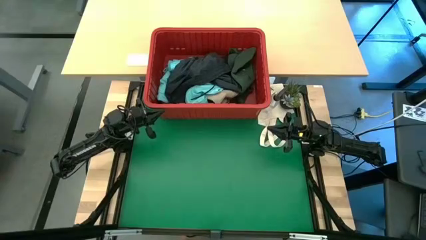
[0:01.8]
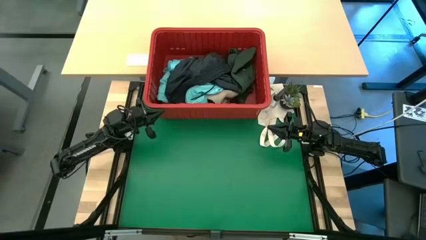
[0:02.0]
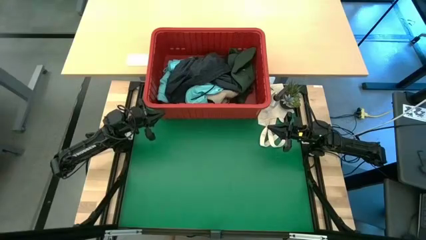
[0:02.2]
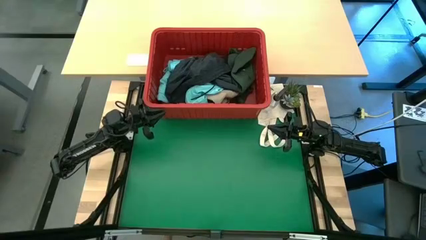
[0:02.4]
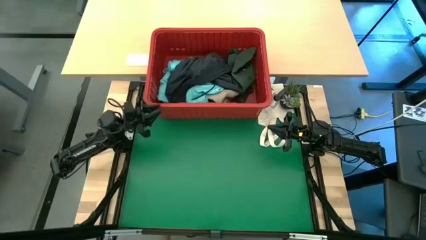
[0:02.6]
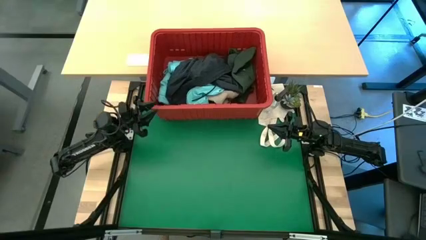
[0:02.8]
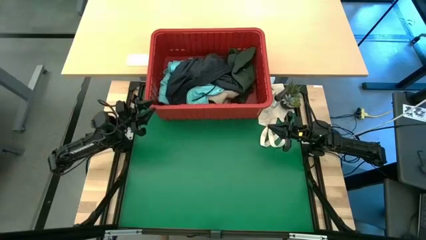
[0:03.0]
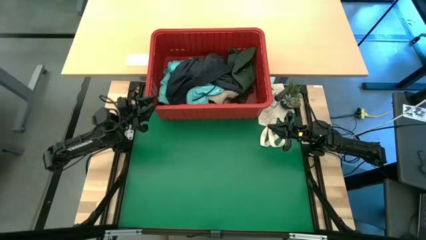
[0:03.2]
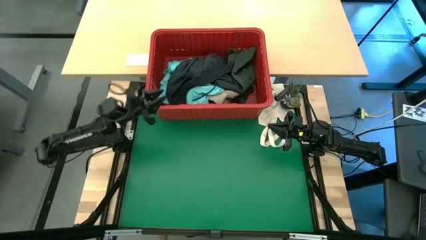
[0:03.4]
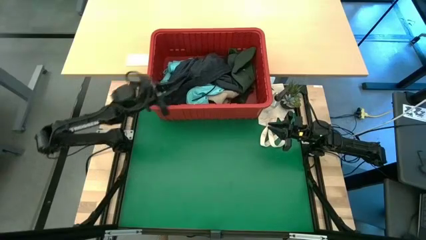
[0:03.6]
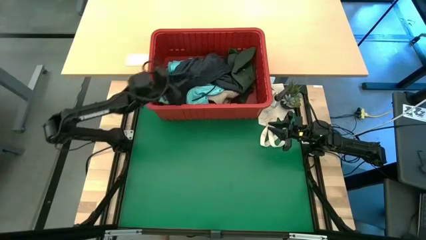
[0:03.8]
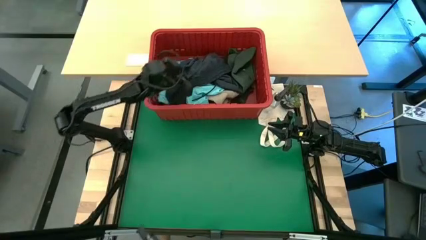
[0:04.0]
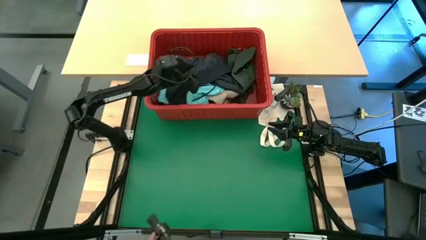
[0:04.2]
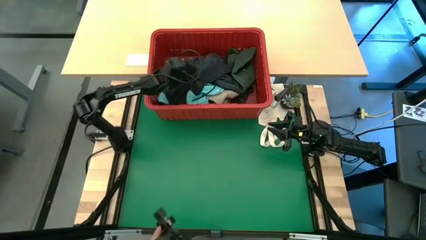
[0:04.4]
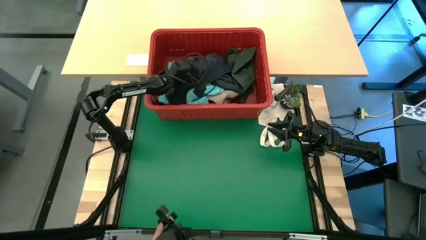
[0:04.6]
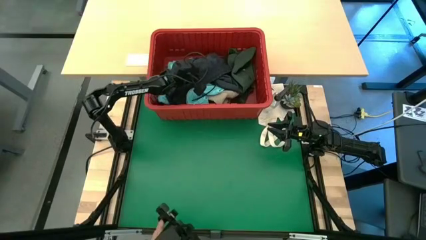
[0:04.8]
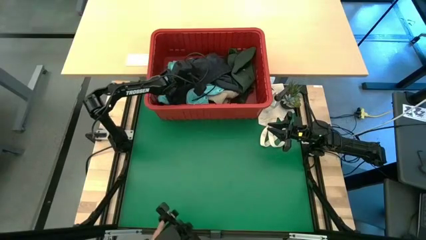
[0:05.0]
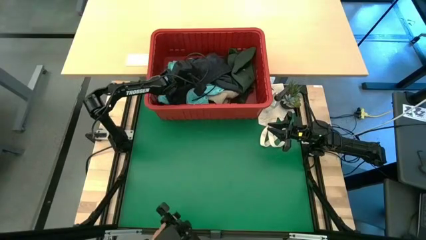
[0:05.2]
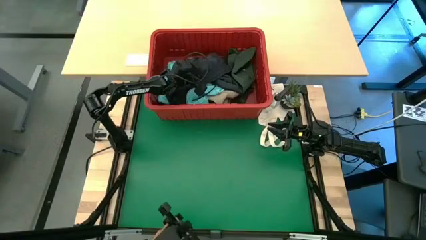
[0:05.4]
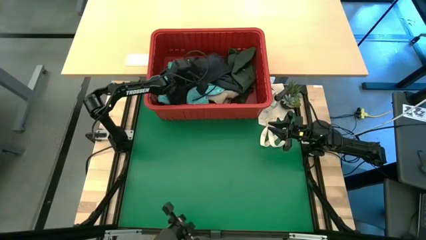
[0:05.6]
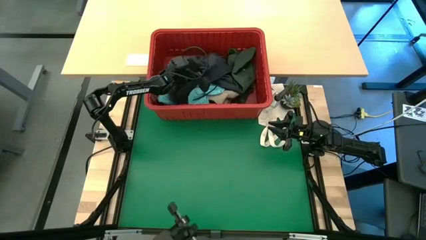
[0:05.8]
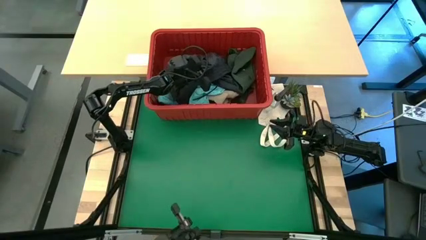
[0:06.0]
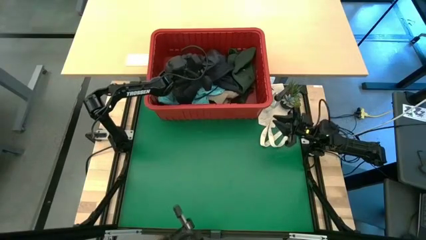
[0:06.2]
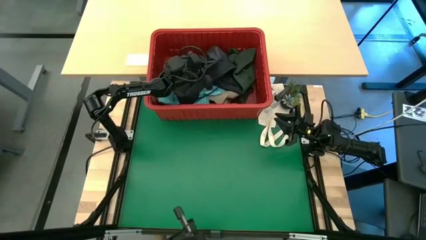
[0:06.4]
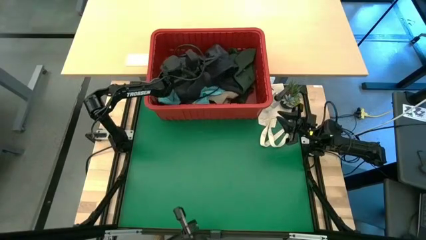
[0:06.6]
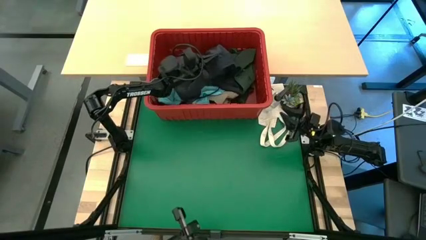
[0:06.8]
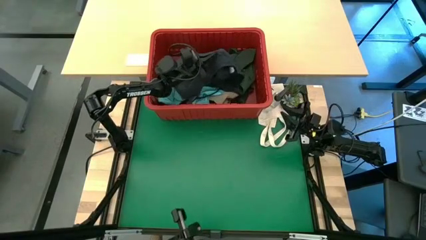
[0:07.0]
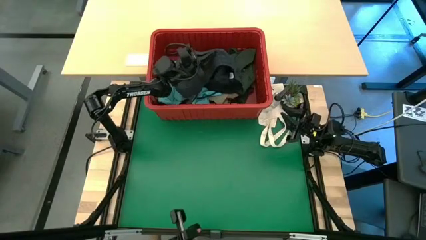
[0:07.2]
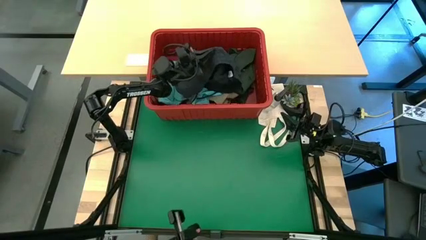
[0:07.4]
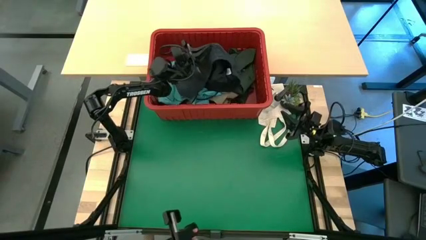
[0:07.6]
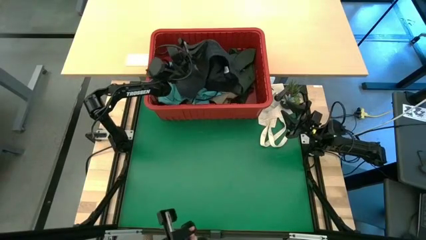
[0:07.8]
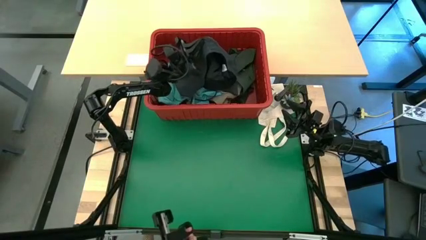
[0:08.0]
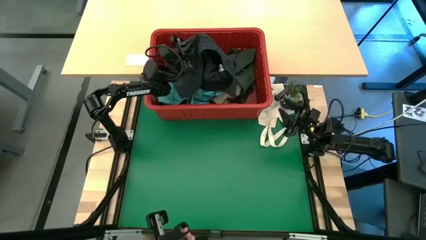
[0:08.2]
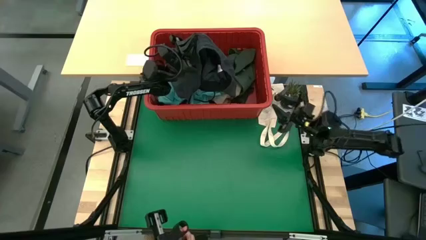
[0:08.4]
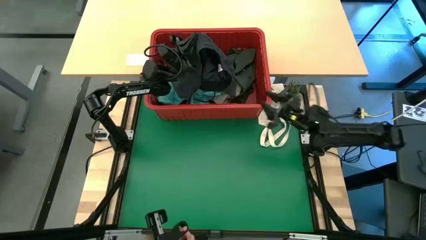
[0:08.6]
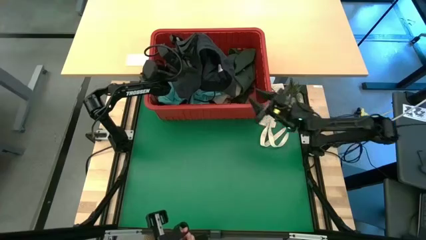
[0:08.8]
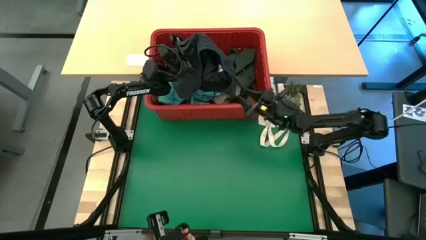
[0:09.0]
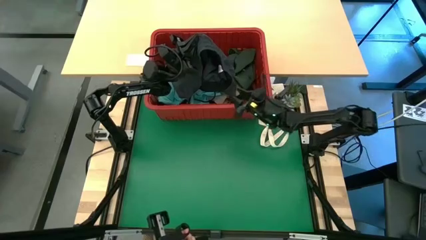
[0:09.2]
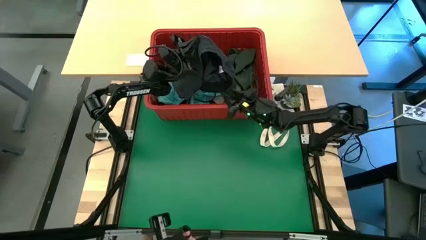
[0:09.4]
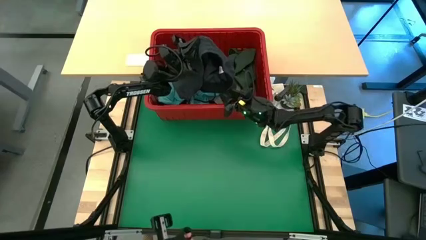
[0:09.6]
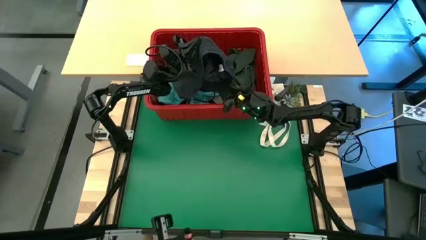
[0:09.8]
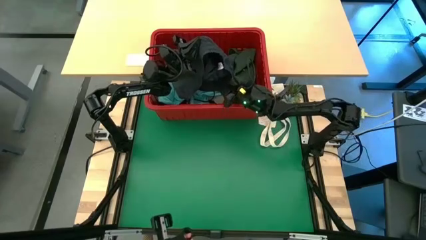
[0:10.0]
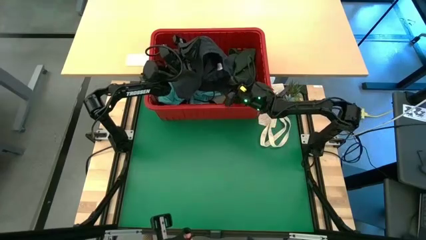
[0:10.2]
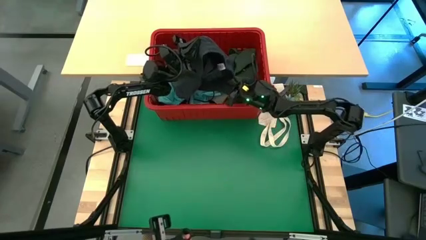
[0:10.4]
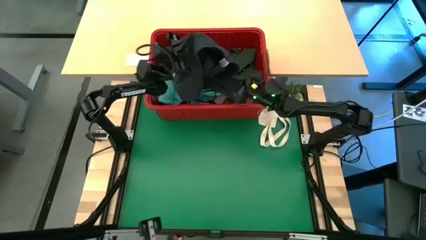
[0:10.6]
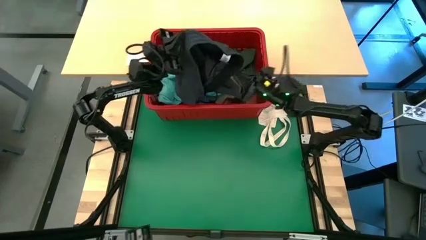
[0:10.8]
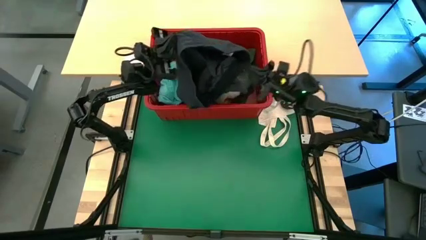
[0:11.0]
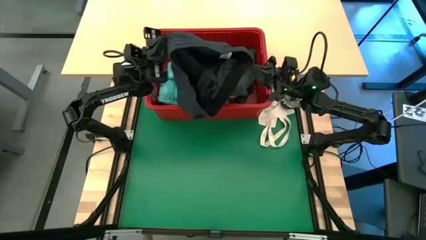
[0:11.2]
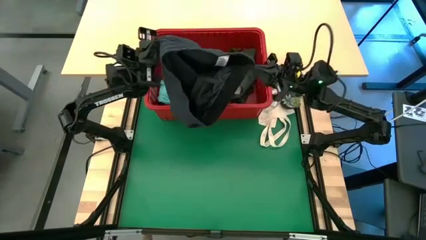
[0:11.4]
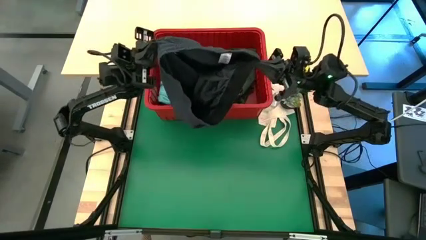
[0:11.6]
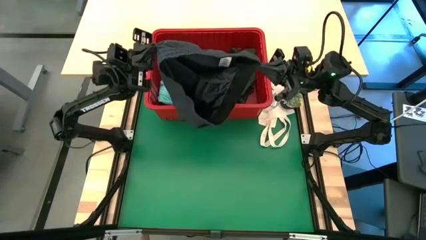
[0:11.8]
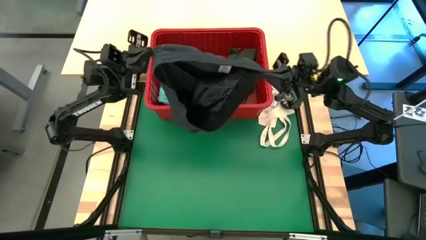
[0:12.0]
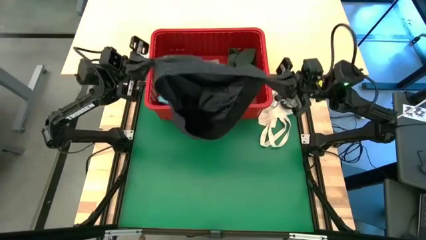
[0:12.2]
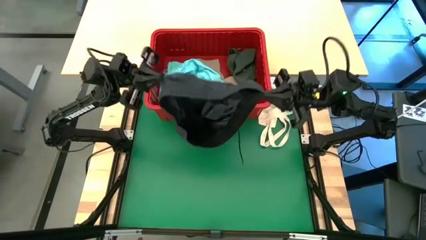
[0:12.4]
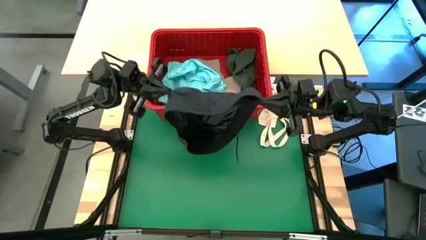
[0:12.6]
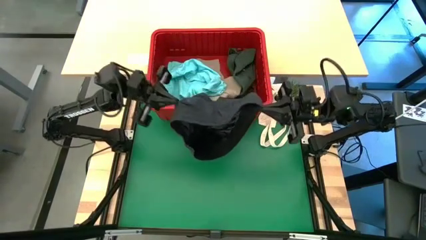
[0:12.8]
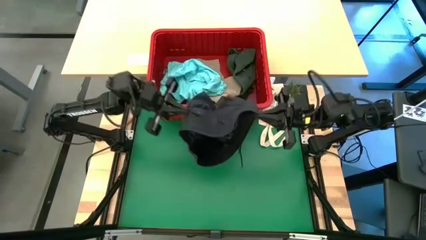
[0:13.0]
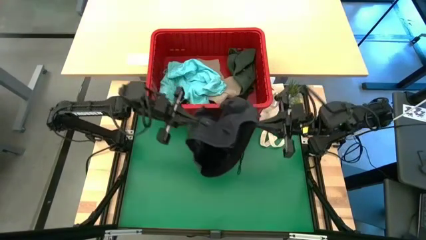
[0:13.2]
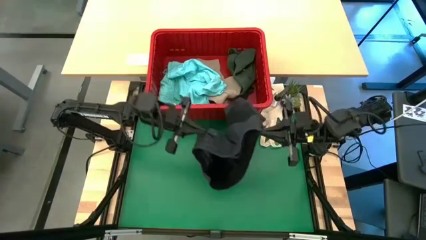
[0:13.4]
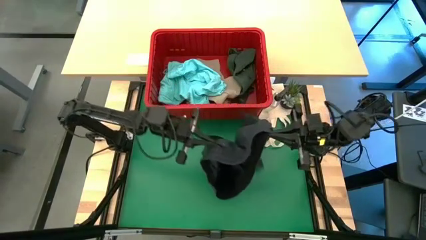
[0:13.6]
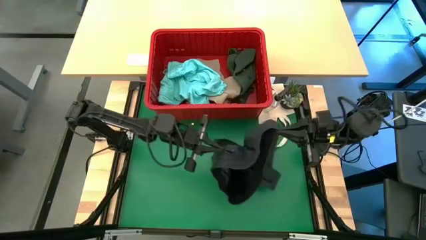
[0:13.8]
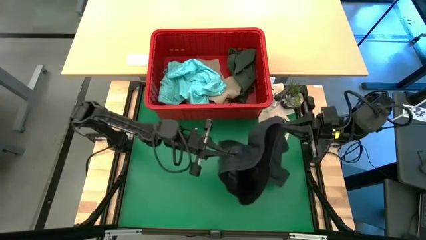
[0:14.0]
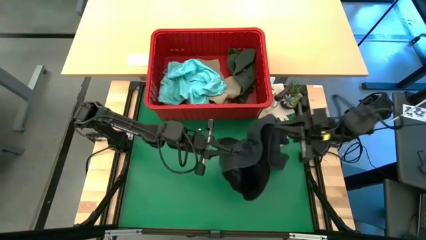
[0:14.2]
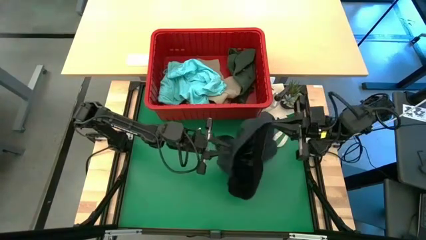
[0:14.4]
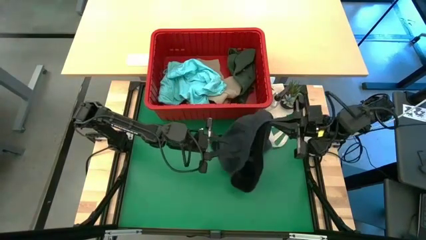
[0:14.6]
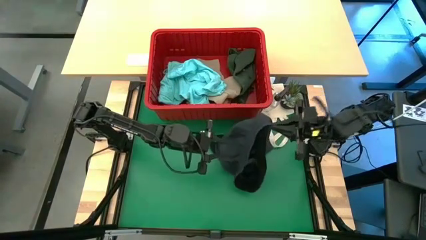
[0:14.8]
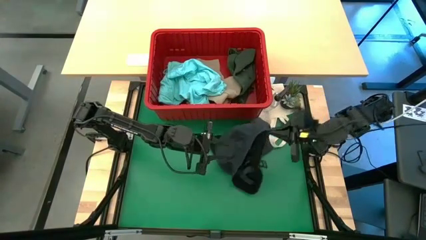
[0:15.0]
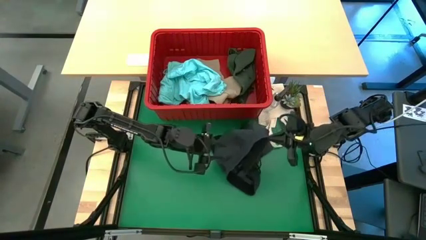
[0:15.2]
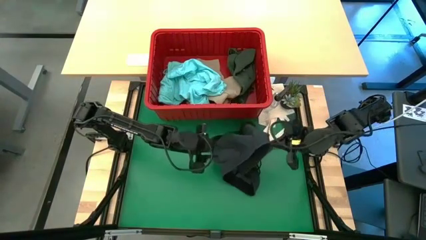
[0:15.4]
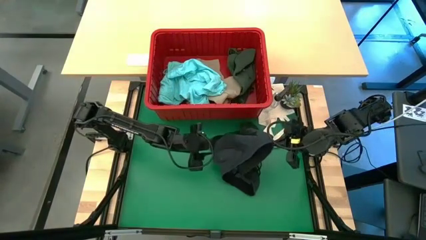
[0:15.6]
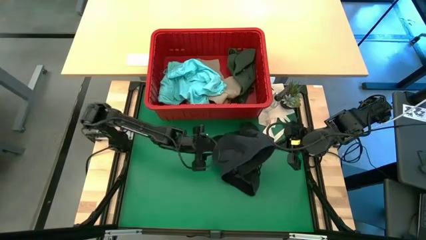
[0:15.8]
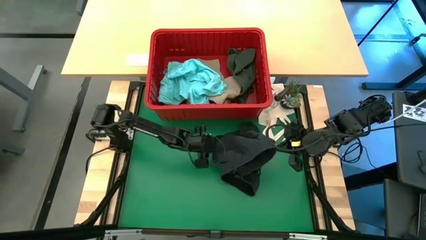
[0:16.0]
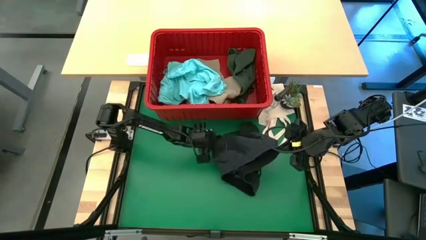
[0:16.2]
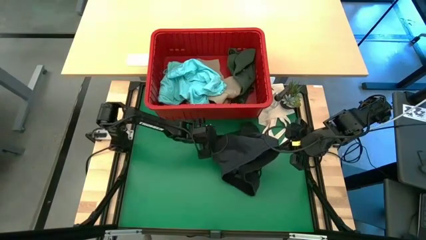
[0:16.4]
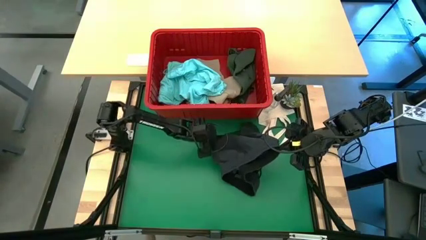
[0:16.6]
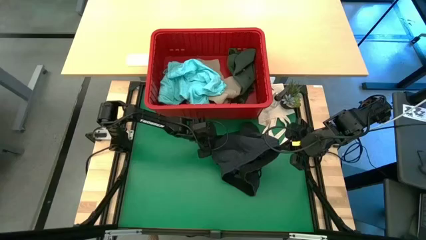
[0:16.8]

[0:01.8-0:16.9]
Task: Fold Laundry from Bin
Fold the black shorts from the red laundry bin
